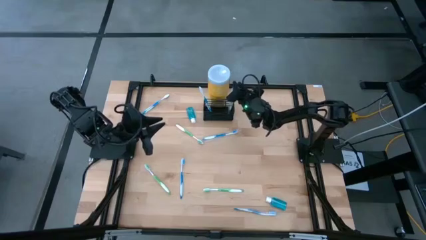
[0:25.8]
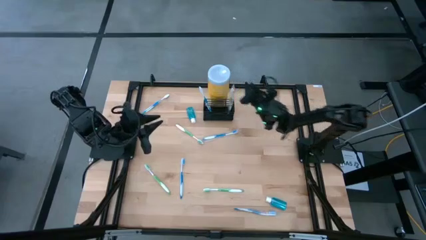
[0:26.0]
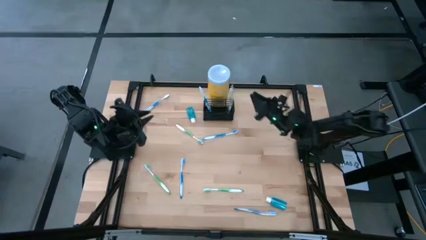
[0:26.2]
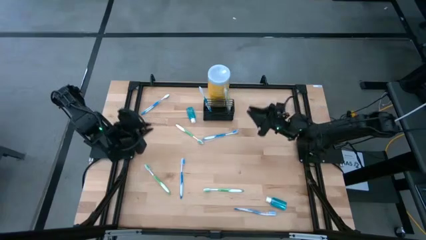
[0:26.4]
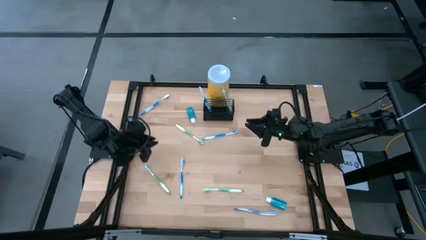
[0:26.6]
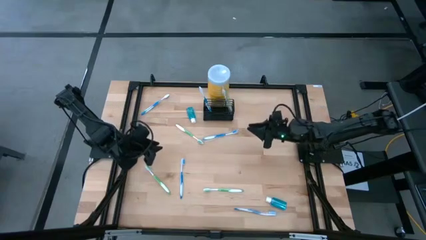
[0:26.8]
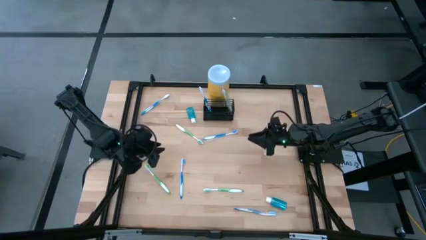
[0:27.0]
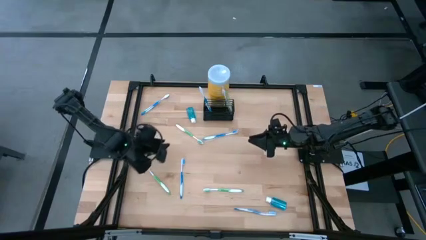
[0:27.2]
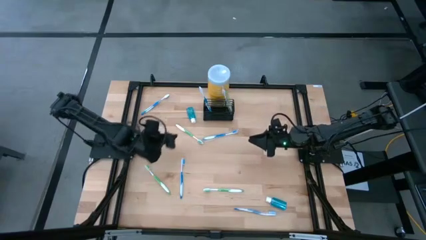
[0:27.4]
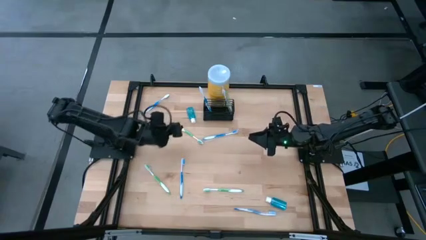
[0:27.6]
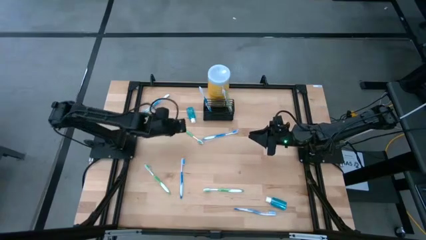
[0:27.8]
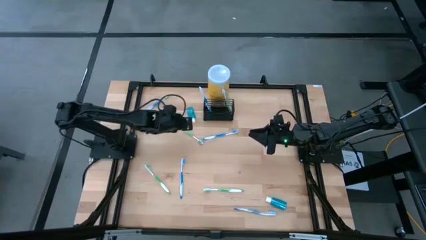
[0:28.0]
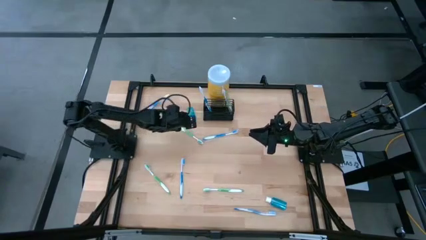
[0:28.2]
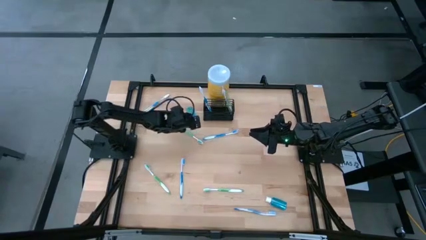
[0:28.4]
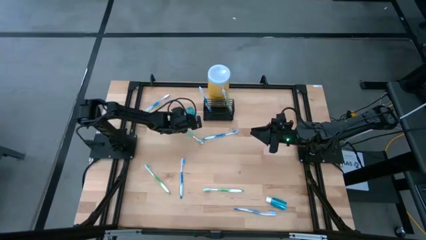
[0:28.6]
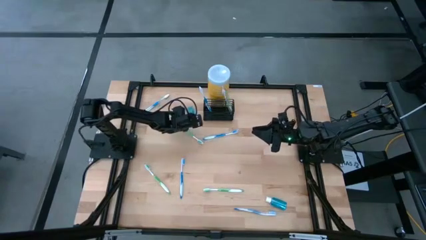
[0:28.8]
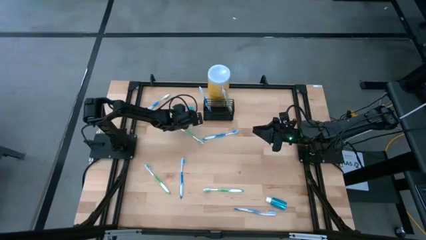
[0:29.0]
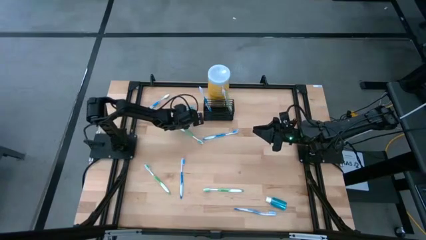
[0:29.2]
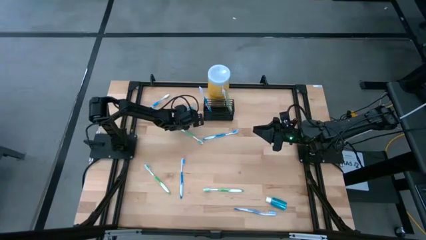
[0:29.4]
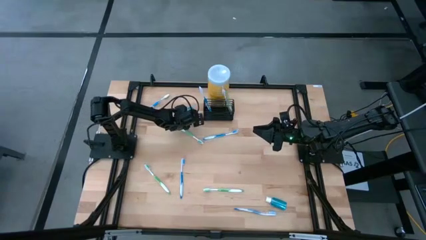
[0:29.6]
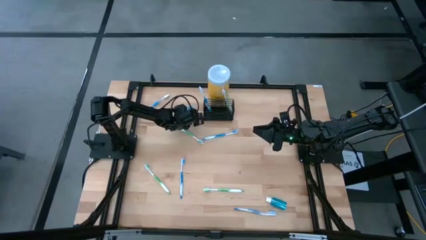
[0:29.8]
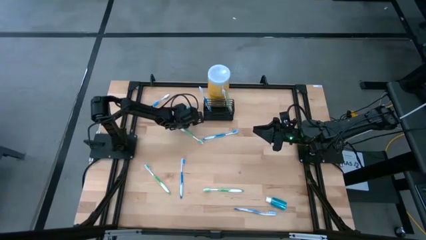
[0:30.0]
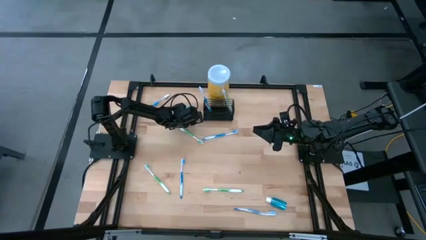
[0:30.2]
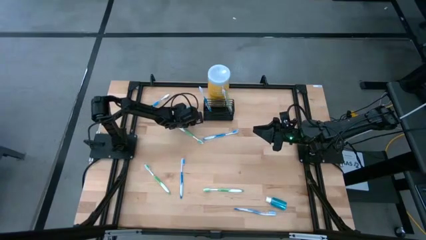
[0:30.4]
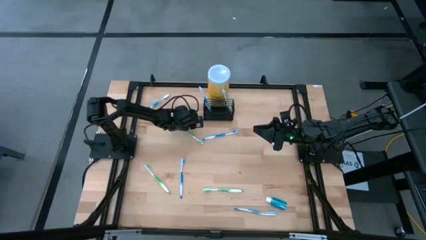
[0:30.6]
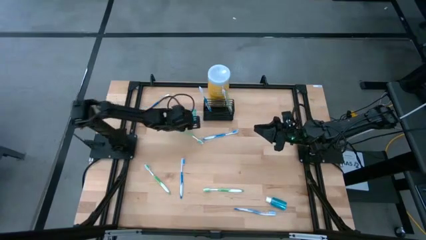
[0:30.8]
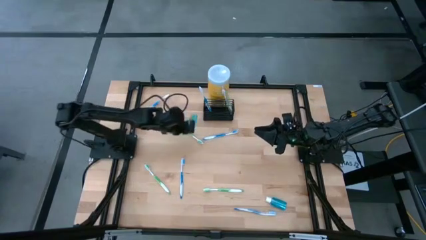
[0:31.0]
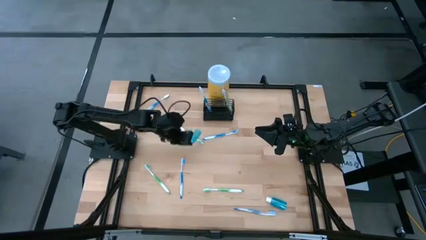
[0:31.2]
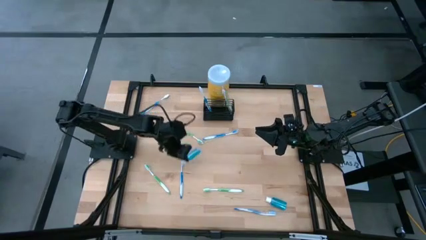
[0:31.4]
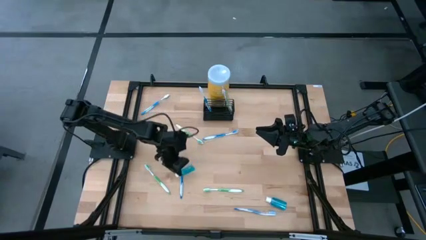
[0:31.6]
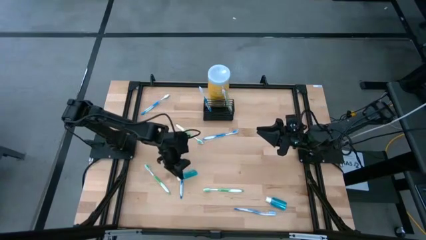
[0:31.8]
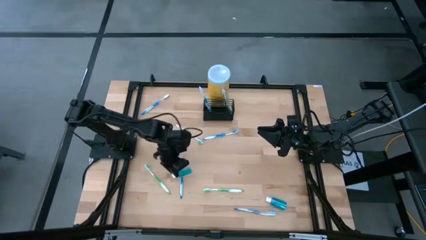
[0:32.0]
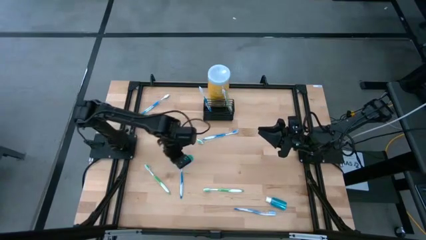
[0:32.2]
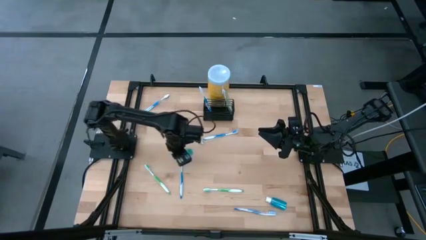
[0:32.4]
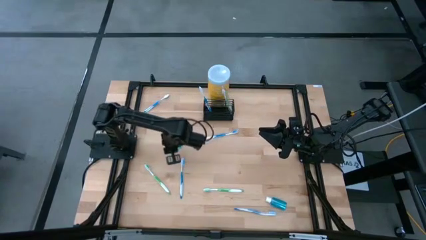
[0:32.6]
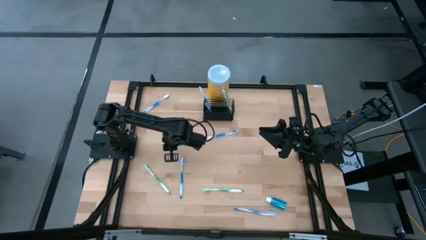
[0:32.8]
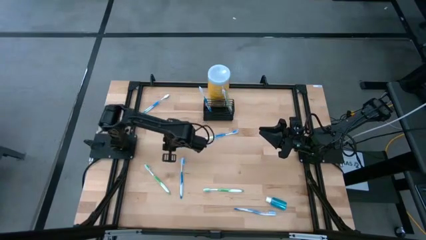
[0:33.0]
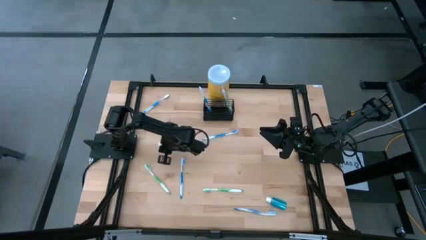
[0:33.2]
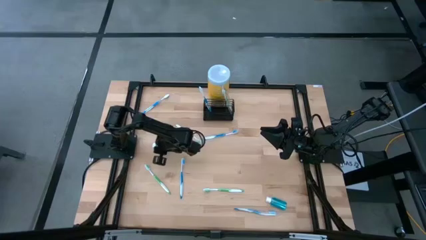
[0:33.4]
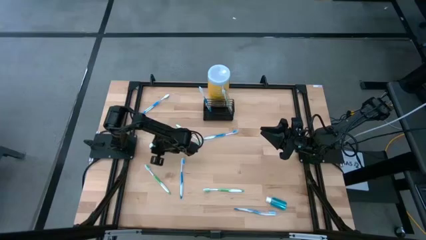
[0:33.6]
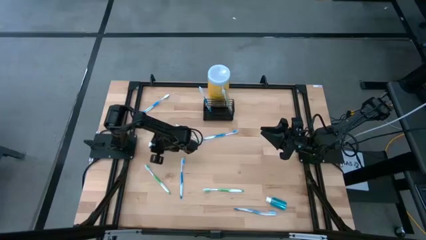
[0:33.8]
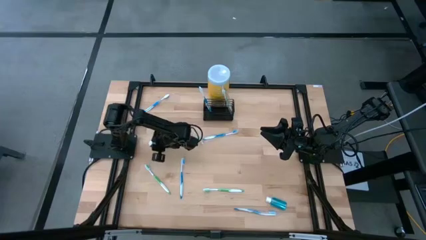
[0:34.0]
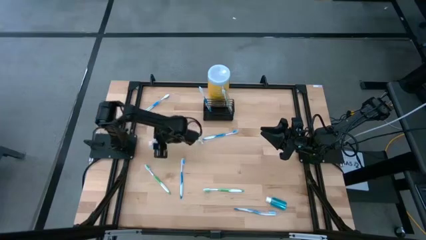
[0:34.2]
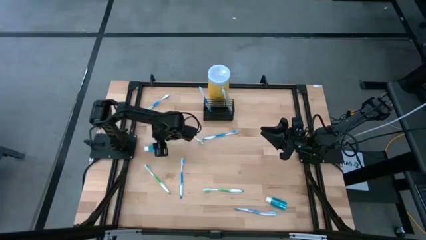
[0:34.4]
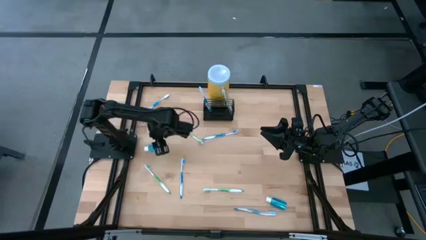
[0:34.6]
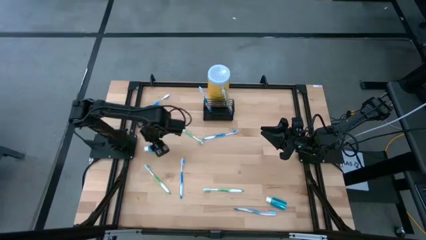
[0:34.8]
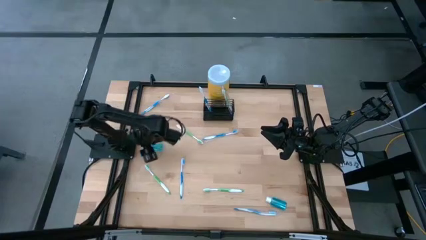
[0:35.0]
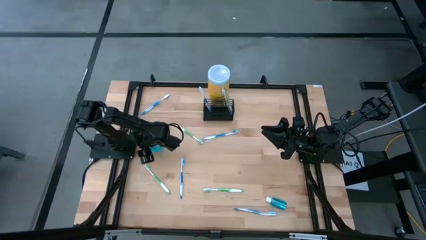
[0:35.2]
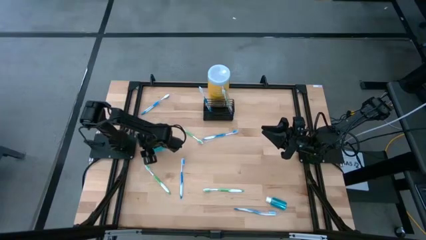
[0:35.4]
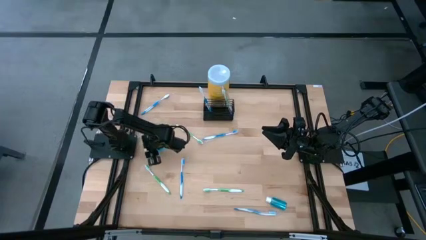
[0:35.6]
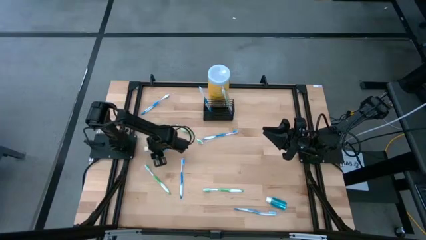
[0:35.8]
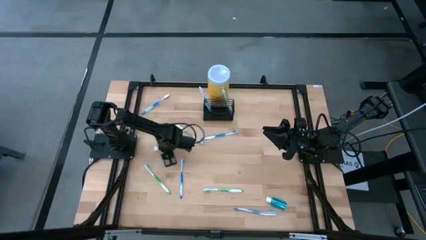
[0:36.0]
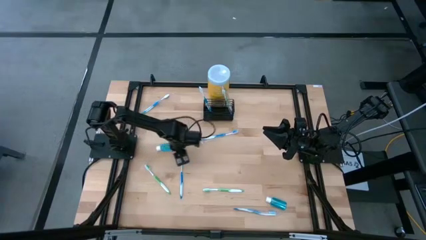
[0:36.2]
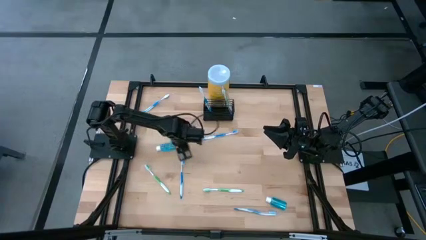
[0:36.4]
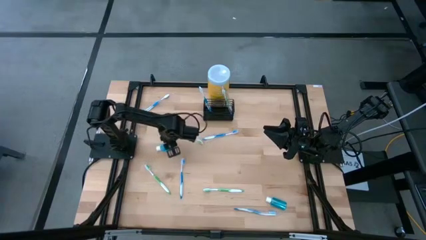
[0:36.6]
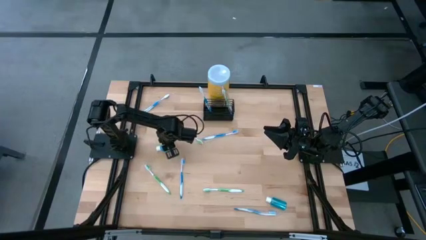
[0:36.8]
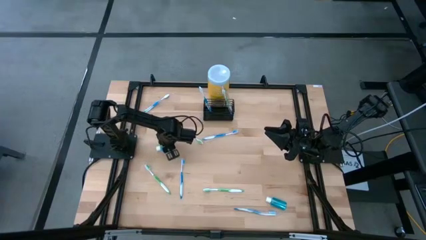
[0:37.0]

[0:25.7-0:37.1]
Task: Pick & Place toothbrushing station
Put the blue mouthwash in the wire organizer

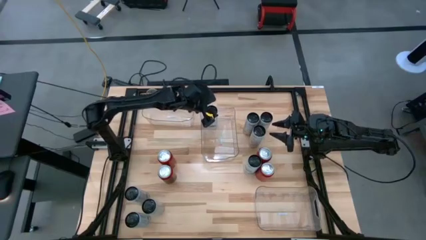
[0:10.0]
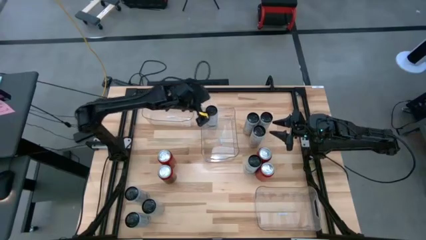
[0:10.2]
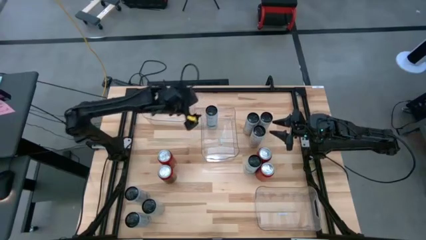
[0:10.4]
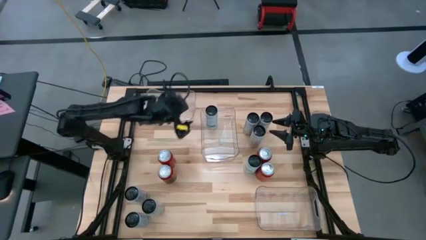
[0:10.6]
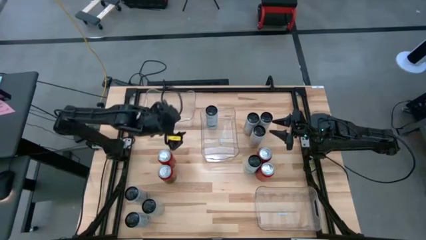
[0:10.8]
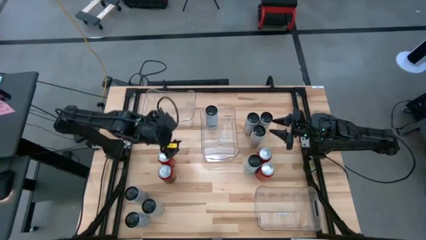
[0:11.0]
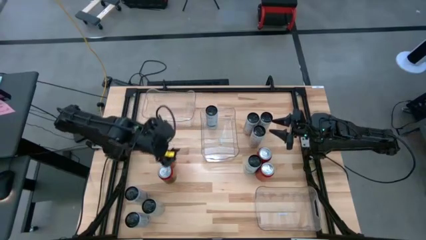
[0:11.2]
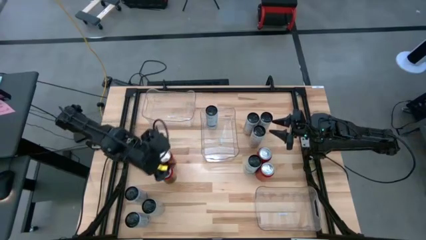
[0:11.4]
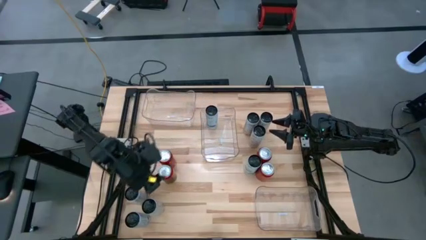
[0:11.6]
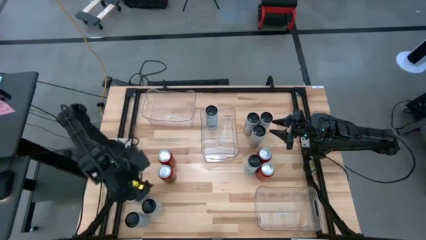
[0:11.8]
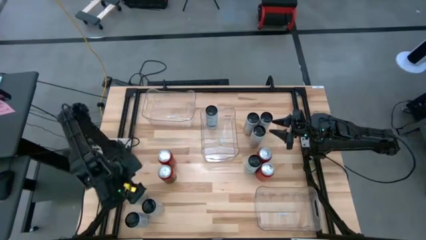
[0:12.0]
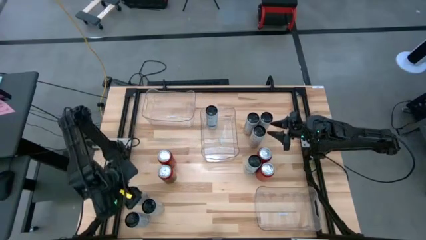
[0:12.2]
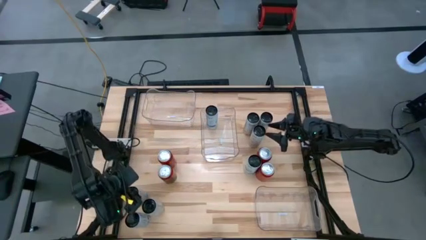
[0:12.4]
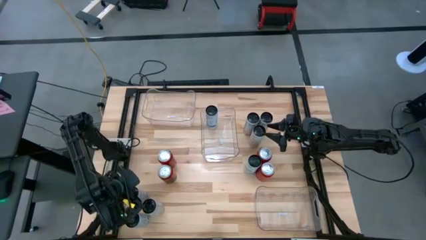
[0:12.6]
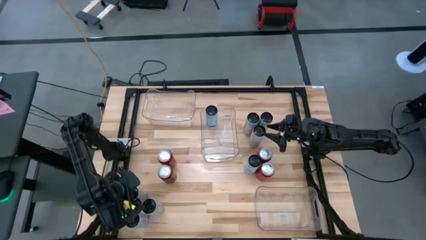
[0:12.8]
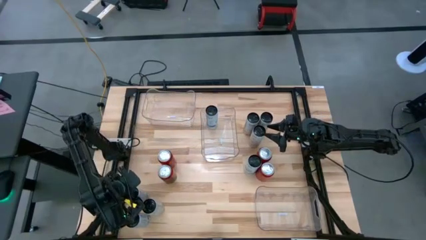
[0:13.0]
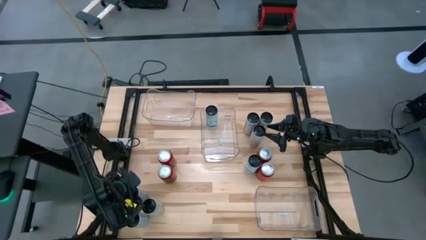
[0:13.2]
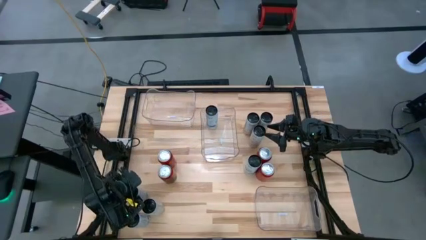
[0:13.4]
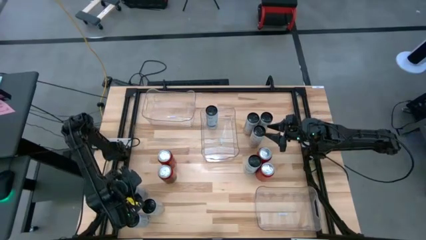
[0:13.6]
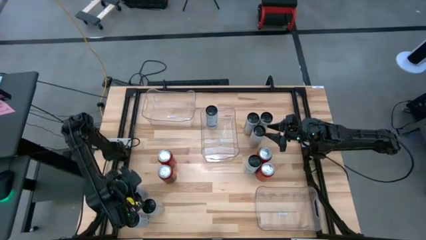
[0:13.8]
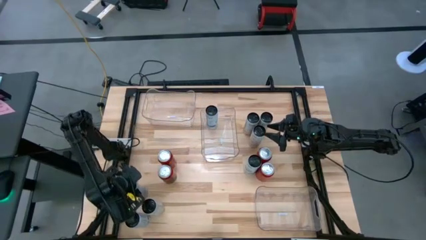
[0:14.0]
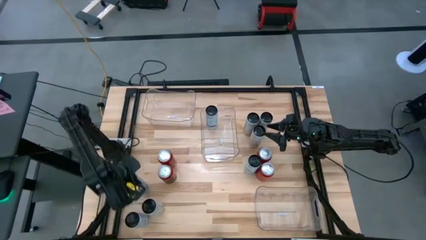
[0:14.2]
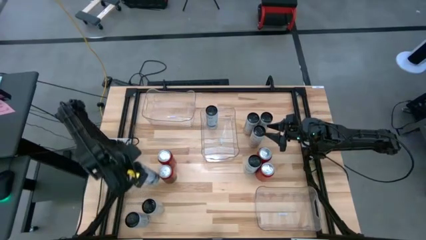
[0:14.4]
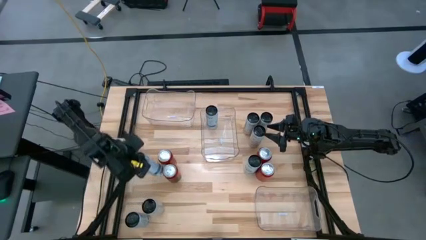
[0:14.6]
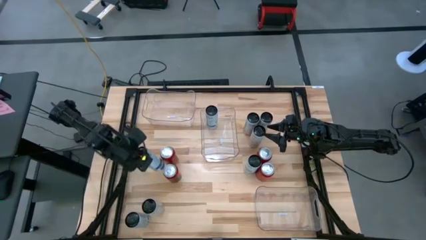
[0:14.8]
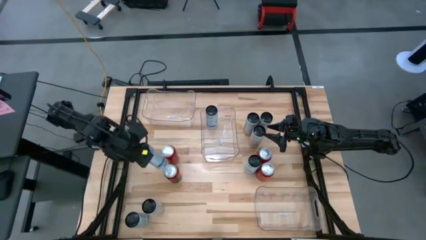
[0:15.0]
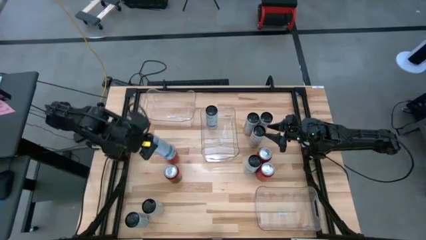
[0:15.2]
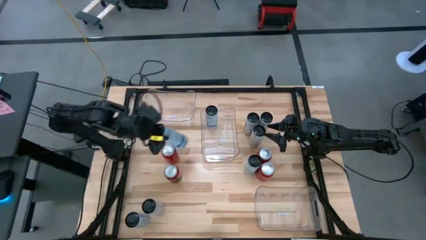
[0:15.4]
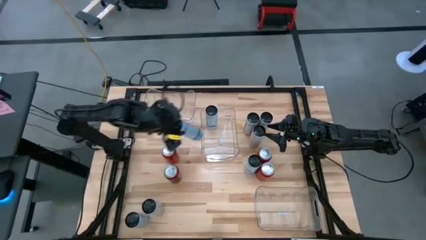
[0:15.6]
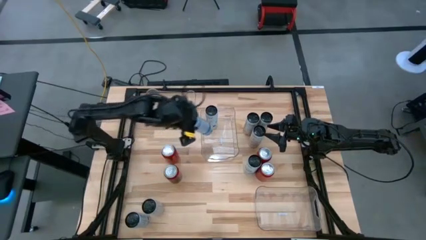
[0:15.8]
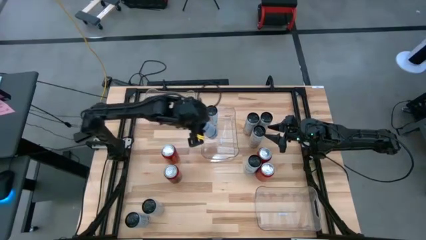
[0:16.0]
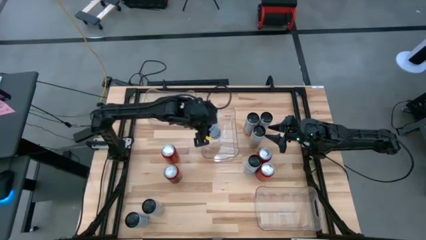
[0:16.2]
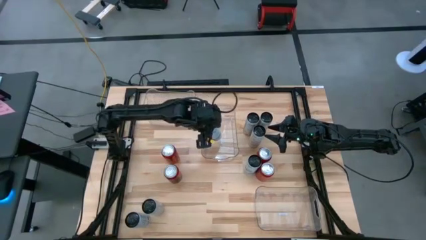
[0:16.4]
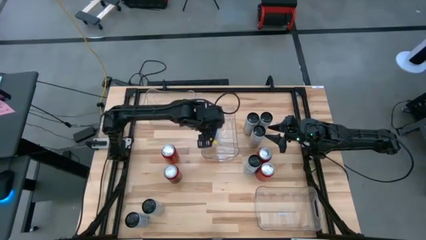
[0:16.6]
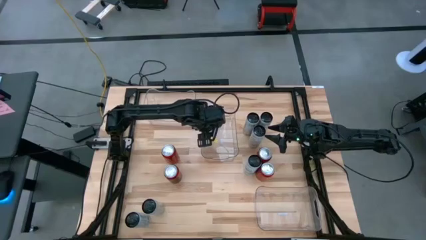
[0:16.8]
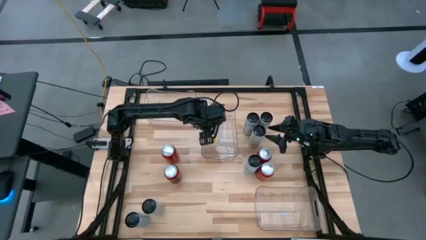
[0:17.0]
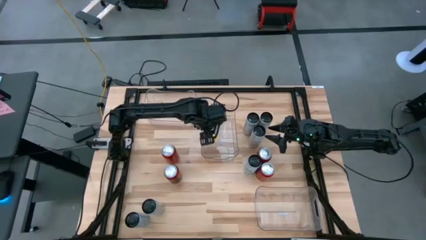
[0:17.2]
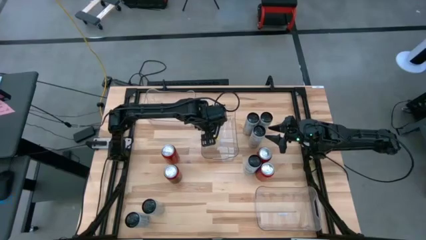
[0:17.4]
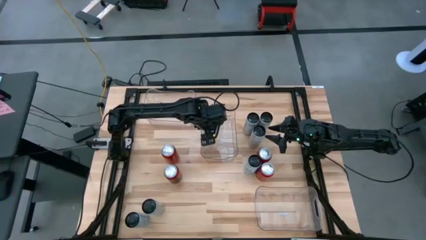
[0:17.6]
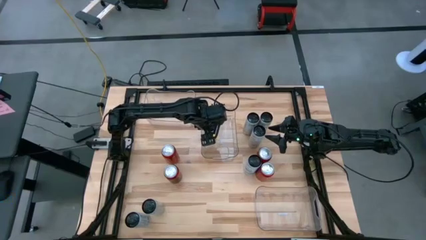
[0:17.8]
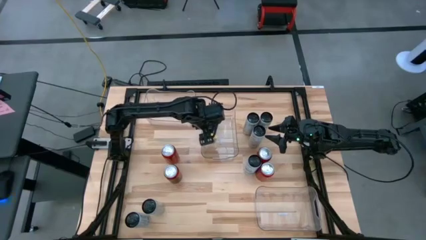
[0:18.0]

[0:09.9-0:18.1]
Task: Sort soda cans
Put the white blue soda can into the middle transparent bin
